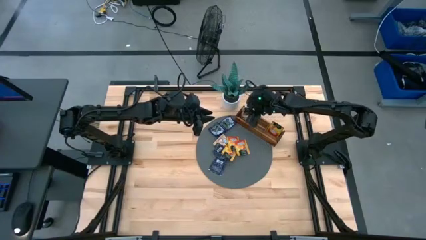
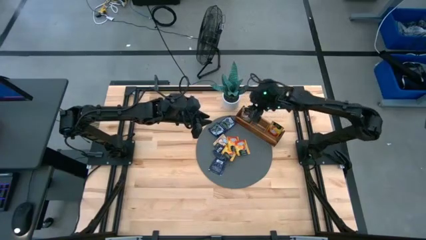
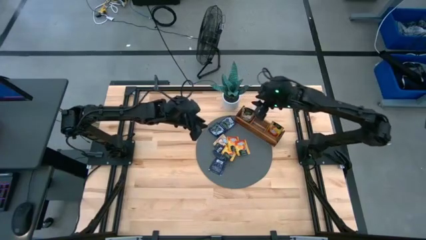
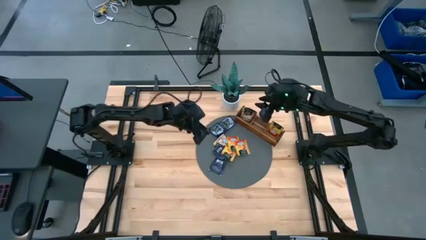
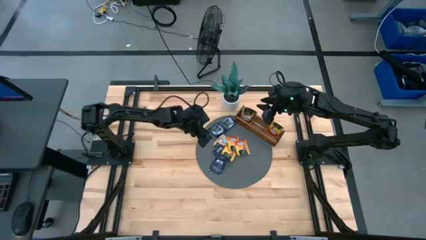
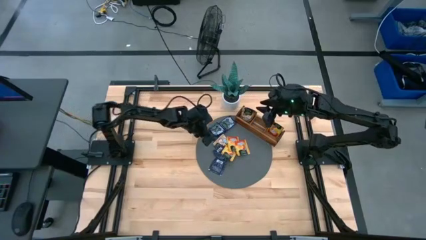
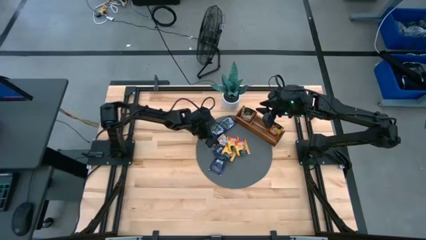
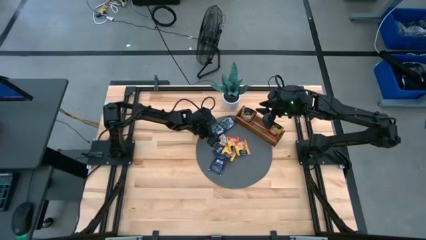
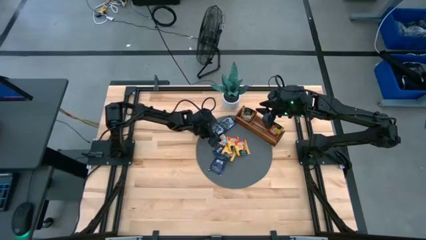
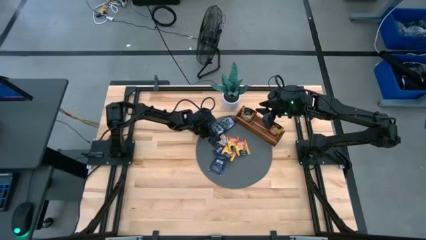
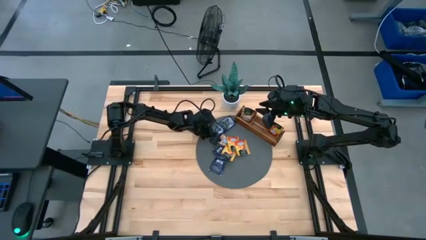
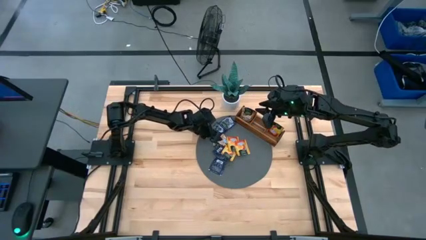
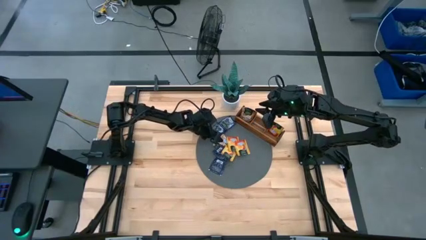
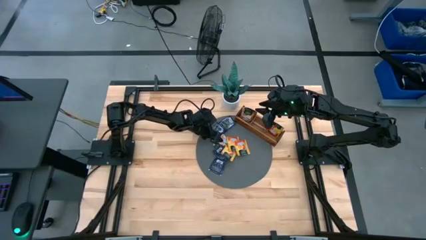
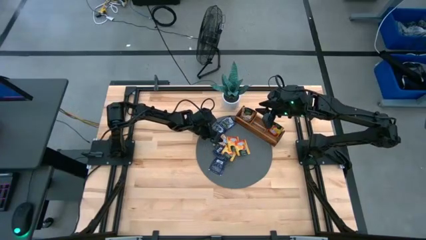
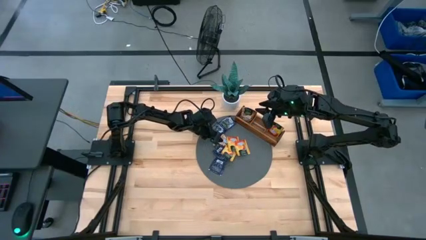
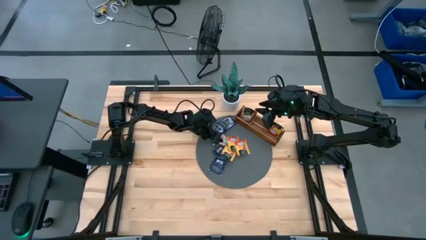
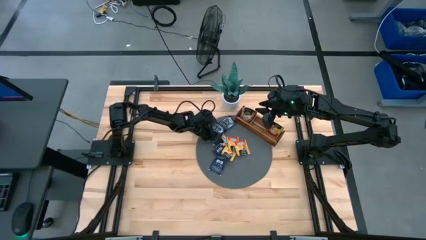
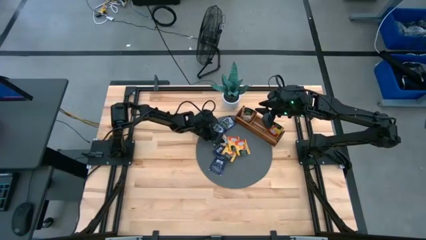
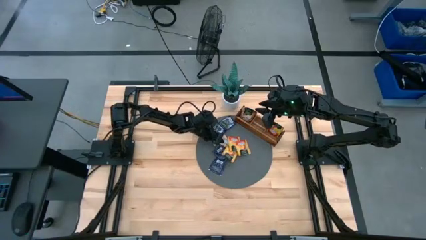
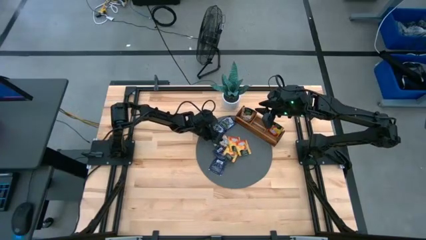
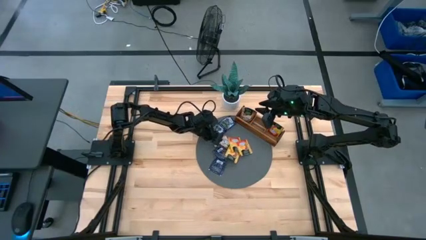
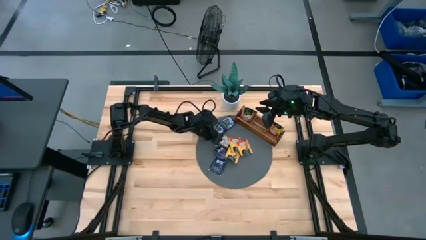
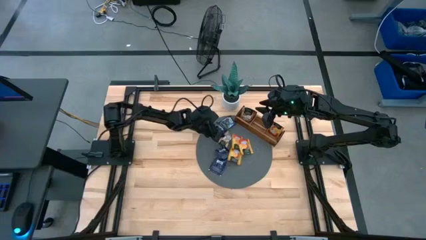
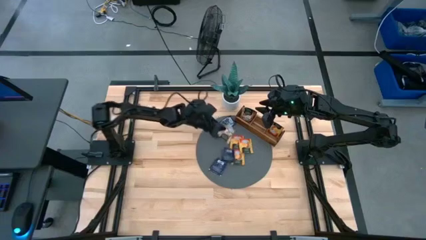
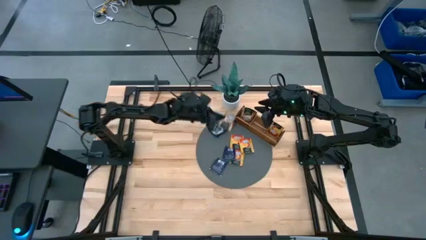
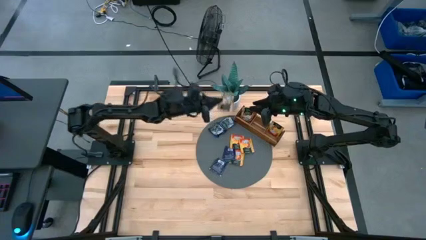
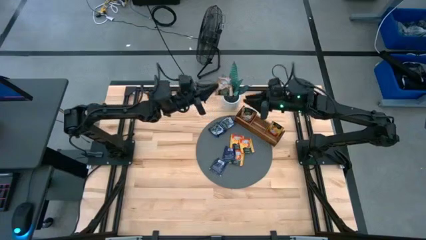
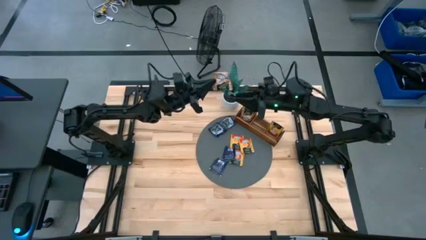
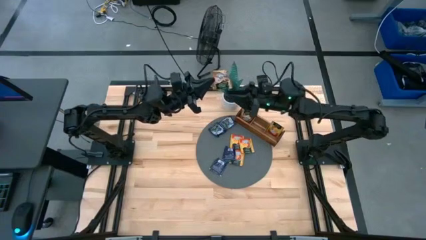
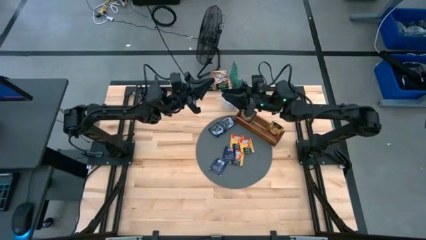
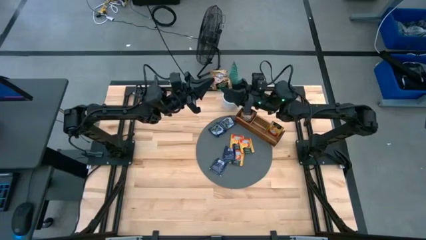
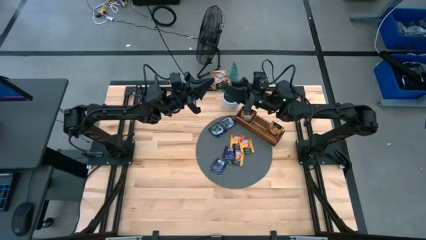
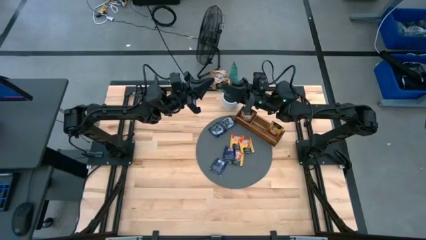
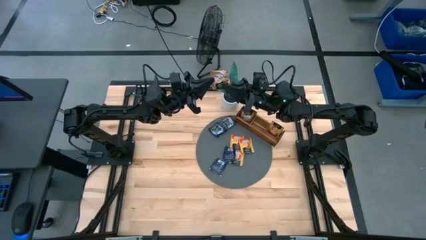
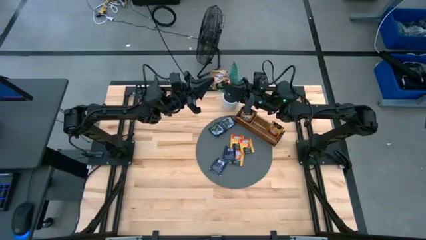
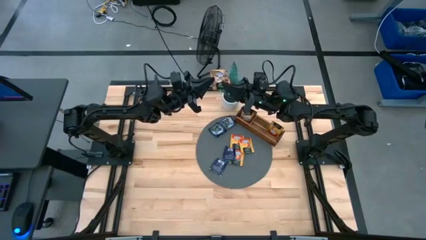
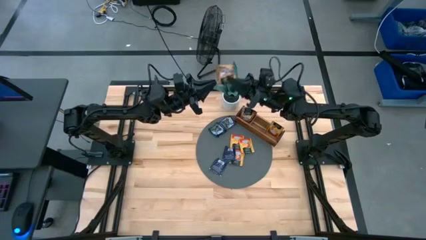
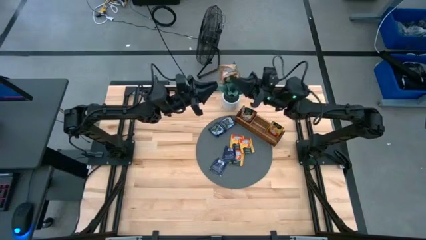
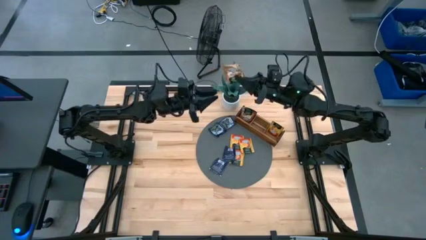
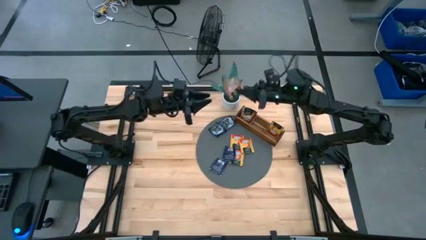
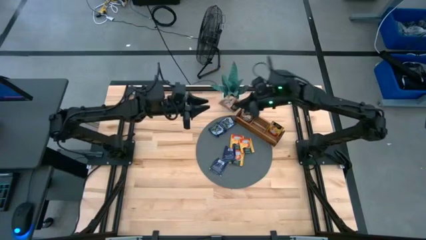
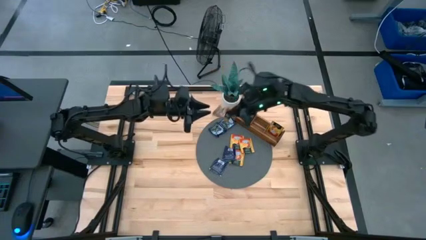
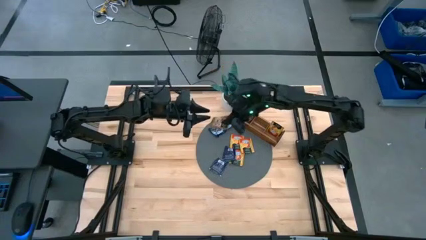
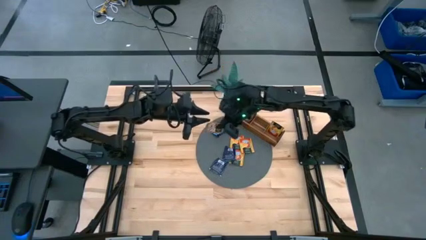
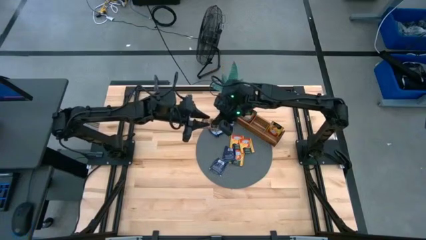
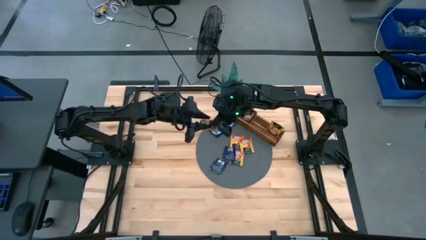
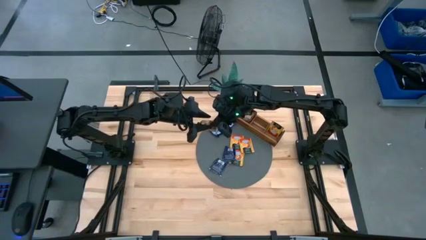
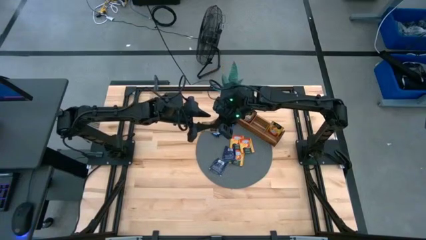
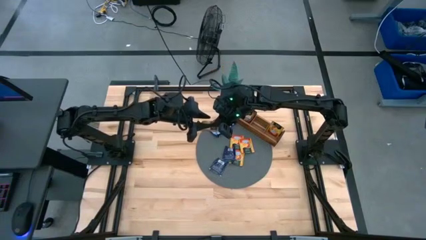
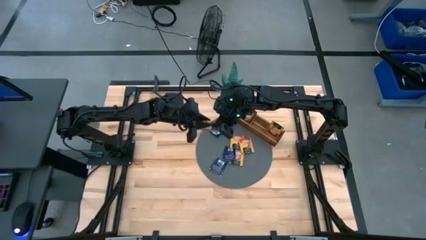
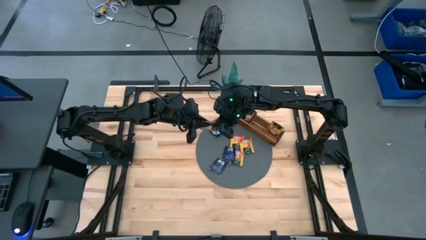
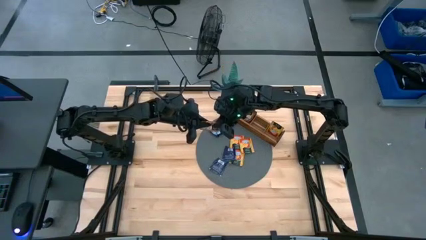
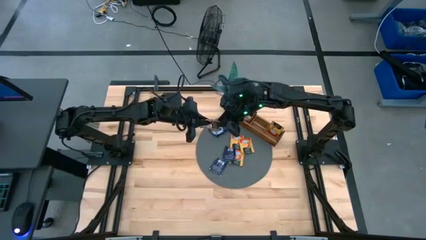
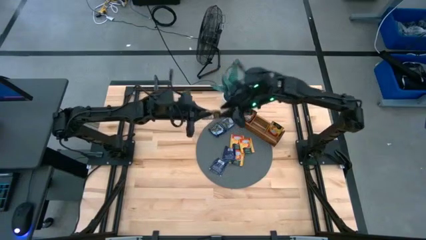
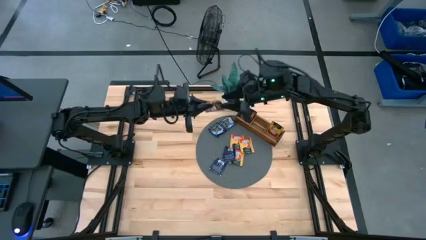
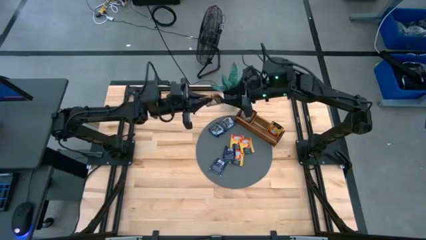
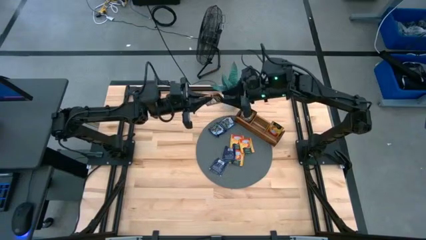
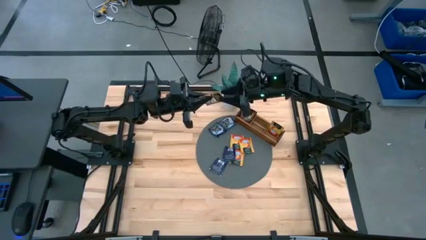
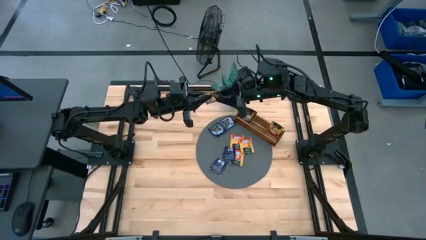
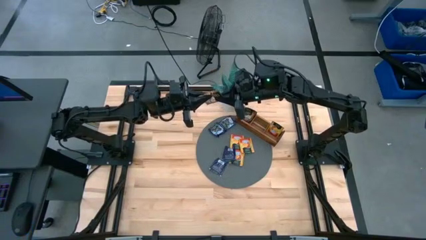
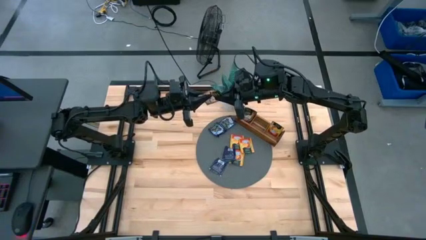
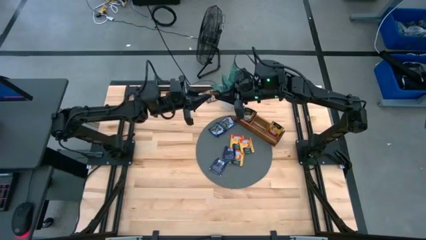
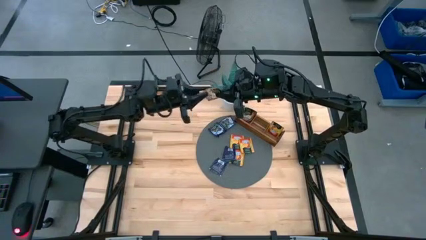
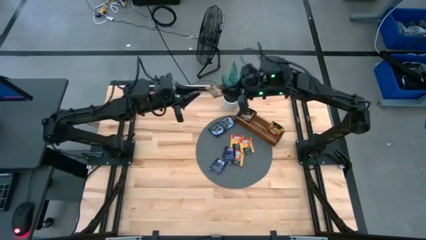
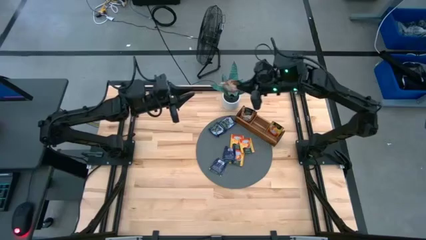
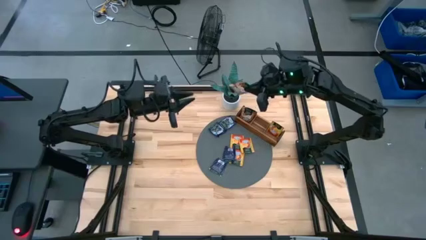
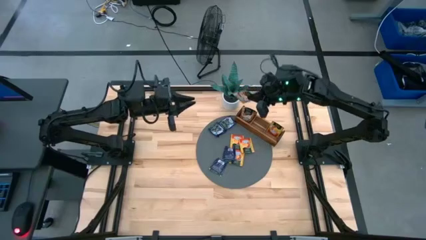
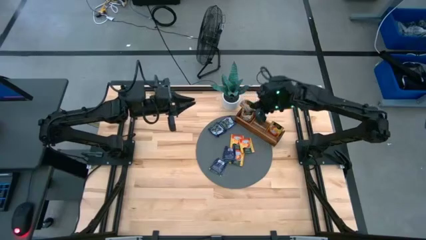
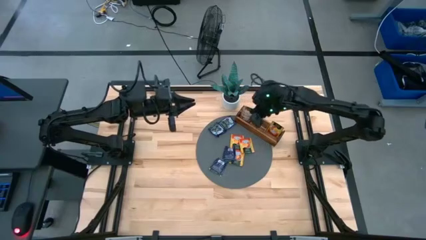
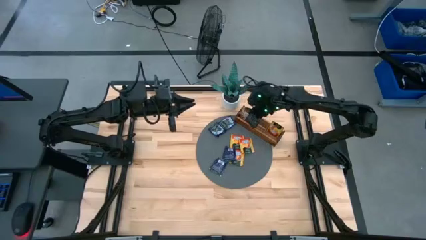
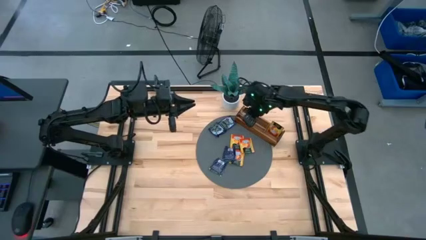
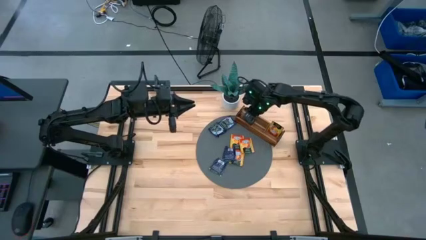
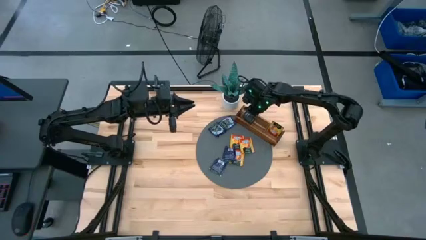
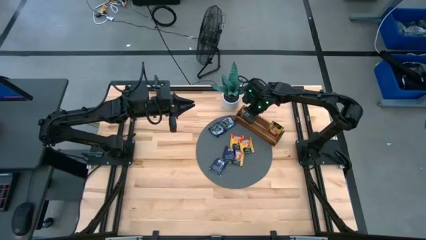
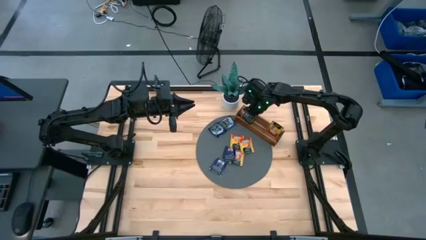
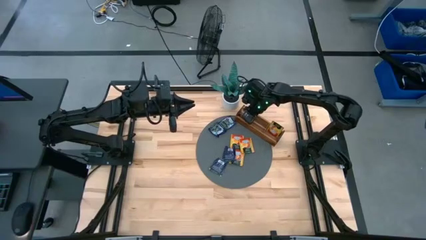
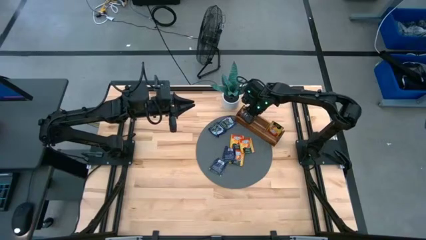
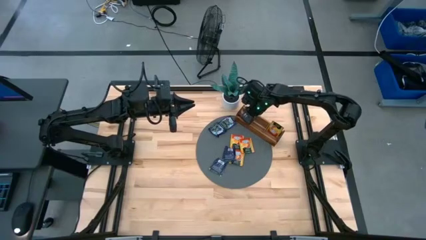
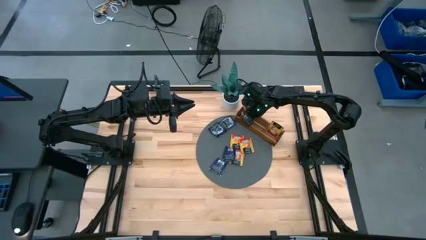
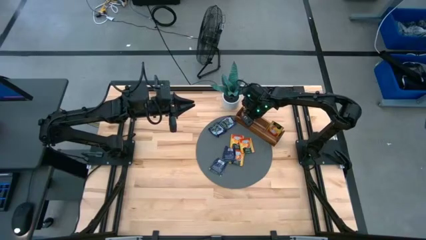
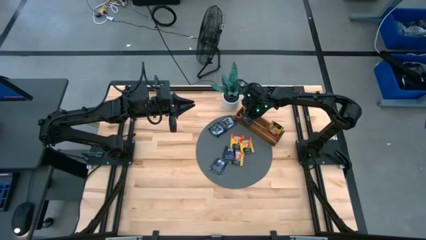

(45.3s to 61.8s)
Task: Pick & Place Tea
Put the brown tea tag into the wooden organizer
